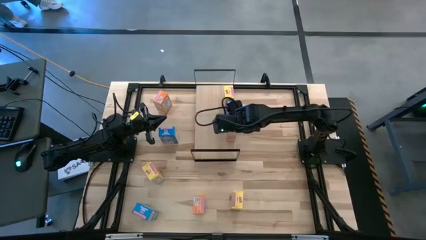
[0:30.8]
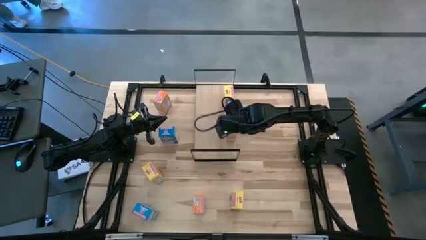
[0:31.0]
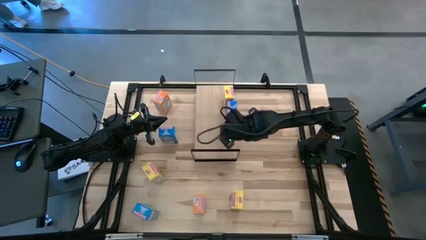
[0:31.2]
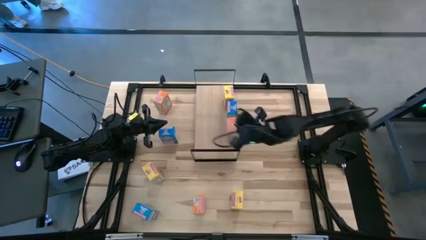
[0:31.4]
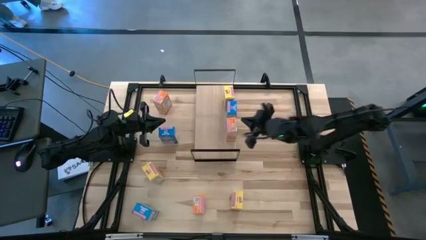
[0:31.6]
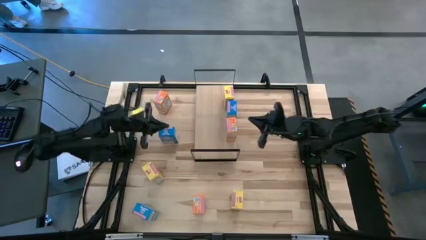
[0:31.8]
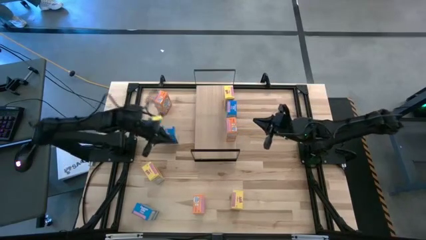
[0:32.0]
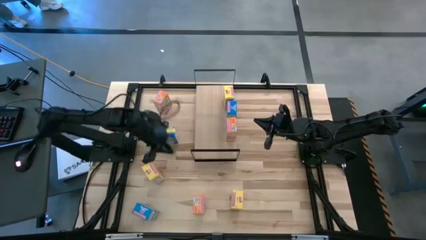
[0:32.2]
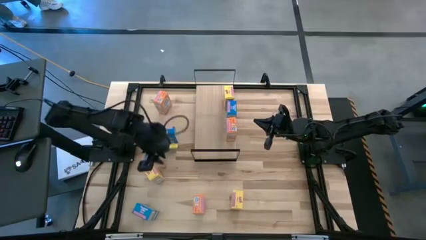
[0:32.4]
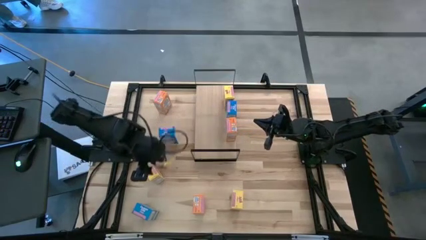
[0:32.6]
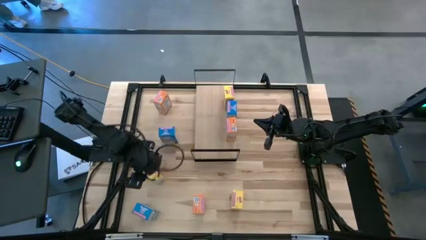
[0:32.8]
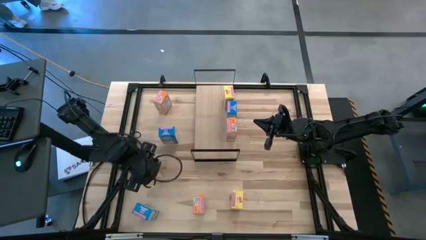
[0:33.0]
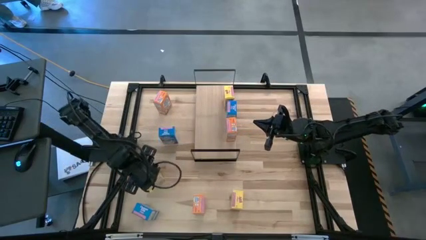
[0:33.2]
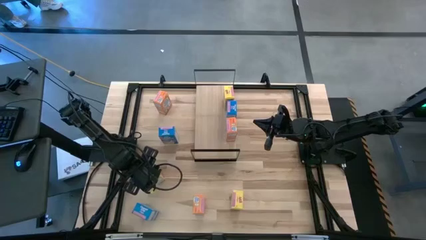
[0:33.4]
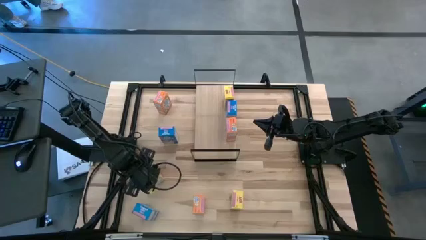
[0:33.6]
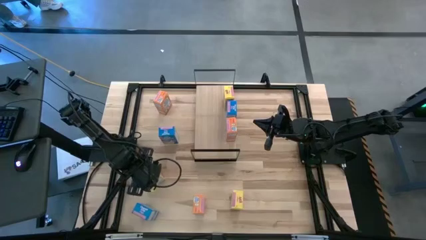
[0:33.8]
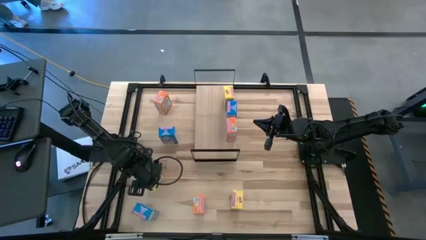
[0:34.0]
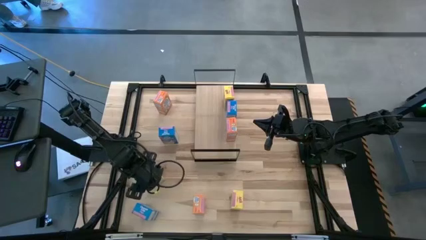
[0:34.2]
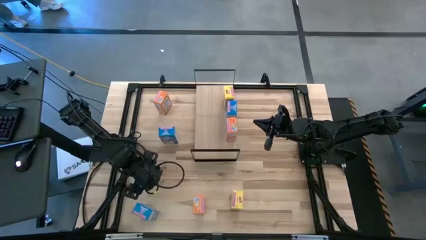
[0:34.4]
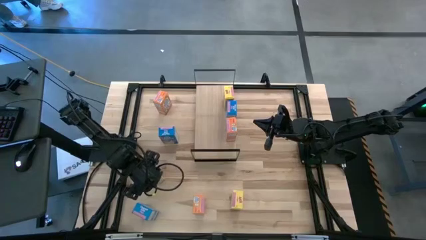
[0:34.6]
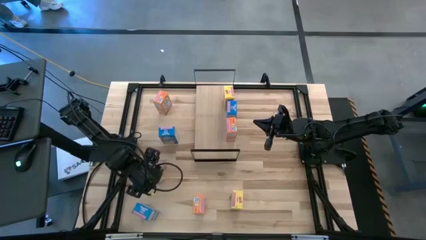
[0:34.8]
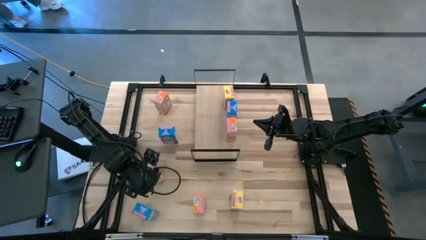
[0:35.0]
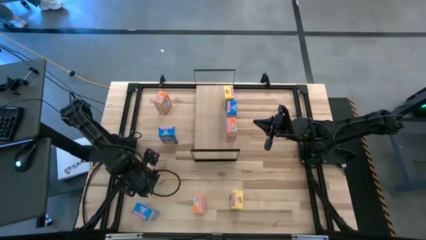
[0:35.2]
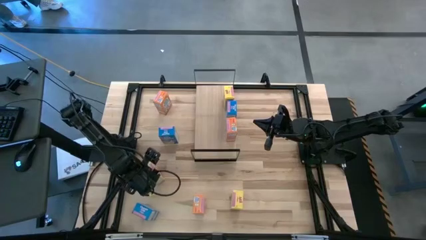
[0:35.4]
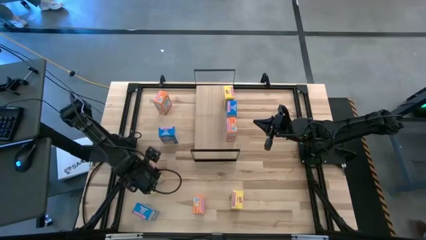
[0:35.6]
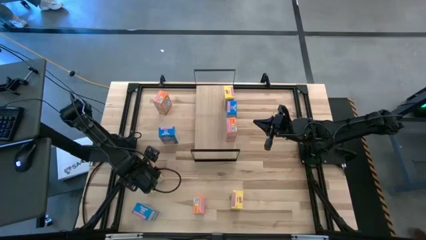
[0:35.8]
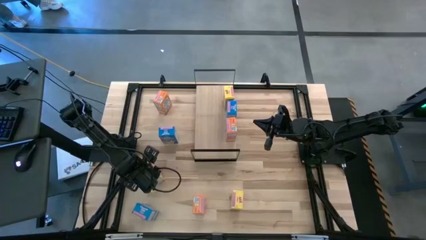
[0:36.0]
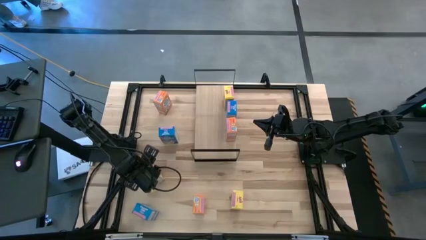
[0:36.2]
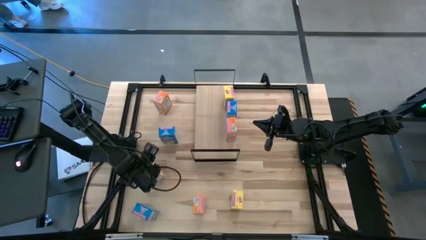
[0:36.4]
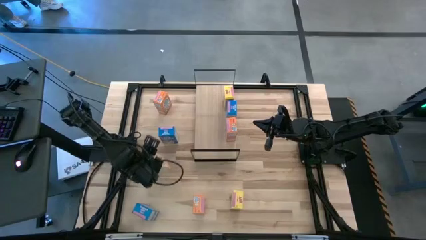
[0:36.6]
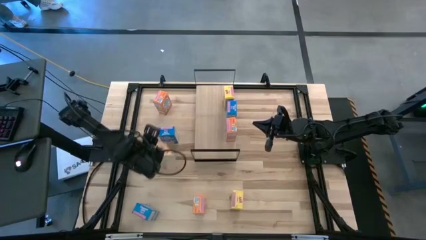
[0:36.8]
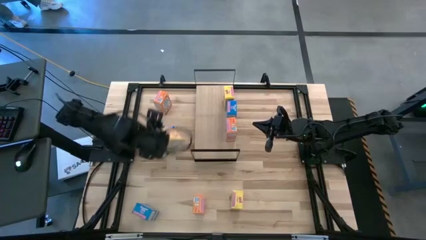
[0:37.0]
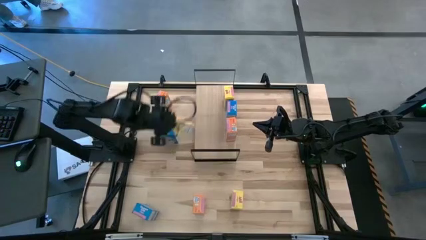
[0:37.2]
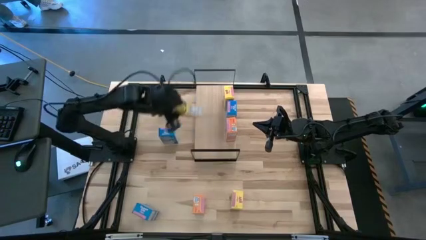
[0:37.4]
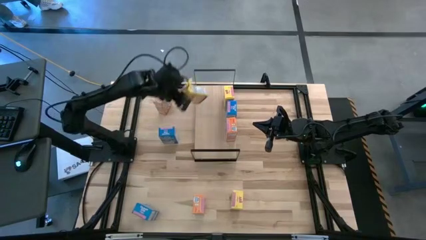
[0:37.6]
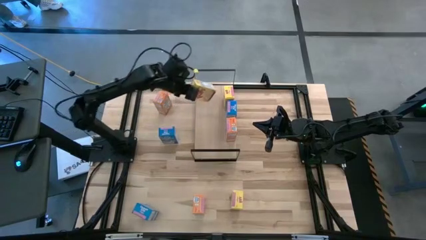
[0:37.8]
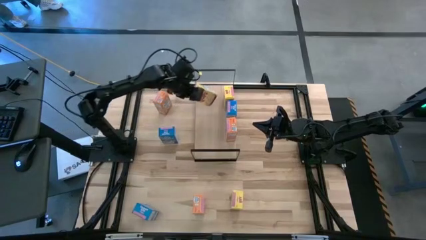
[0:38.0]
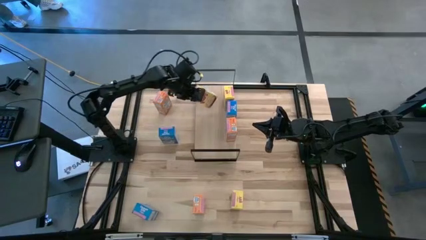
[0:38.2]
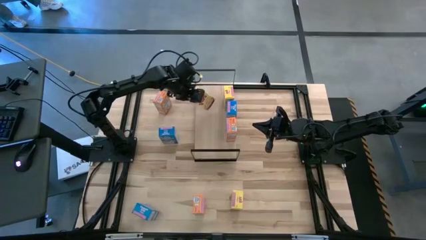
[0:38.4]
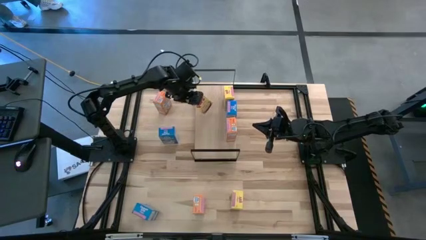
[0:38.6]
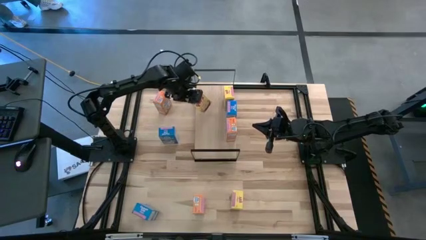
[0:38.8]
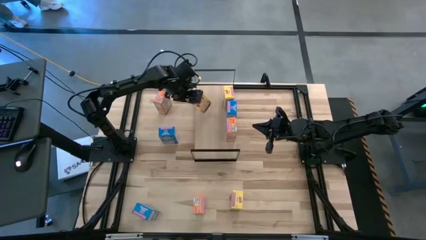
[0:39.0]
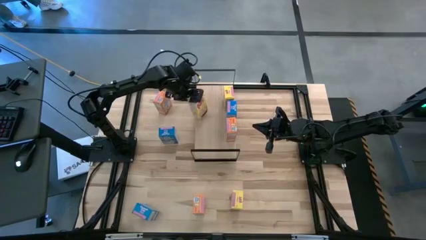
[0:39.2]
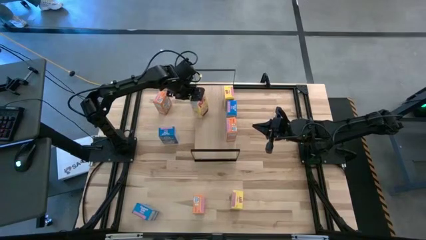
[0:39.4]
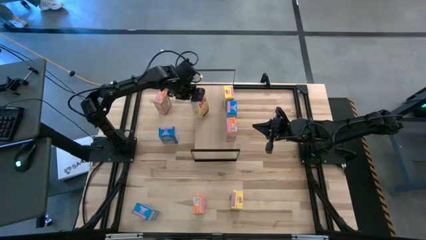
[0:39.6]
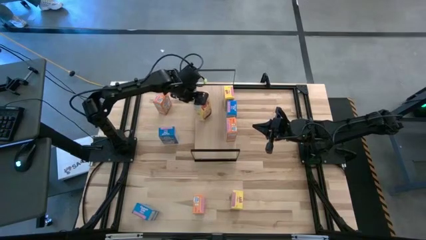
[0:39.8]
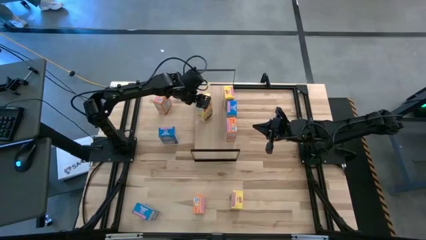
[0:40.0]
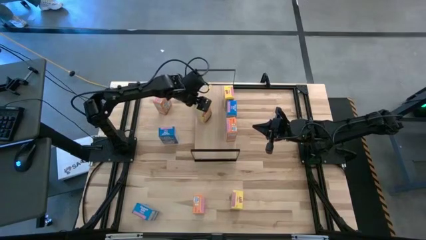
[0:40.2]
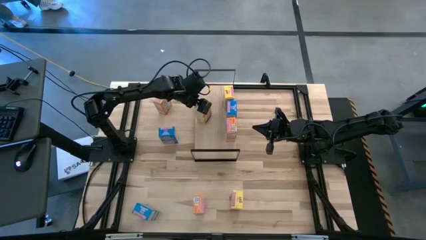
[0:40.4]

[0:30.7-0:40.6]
Task: Stack cereal on shelf
Put the left yellow cereal box on the shelf aligned with the other yellow cereal box on the shelf

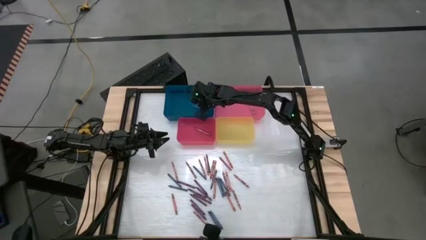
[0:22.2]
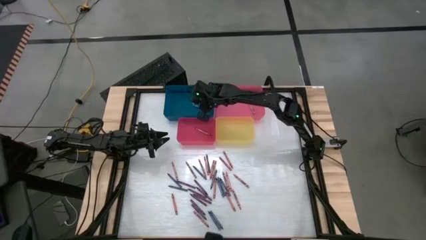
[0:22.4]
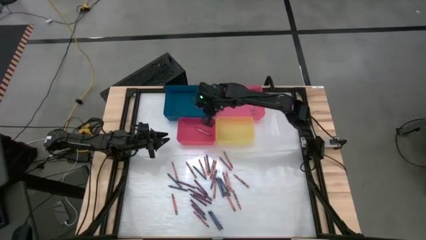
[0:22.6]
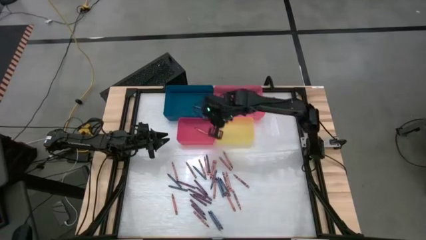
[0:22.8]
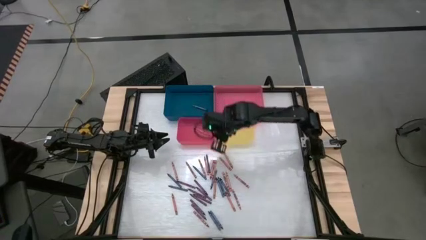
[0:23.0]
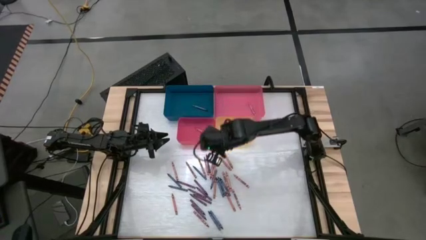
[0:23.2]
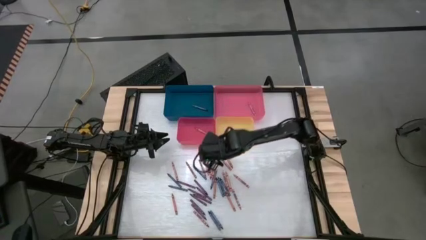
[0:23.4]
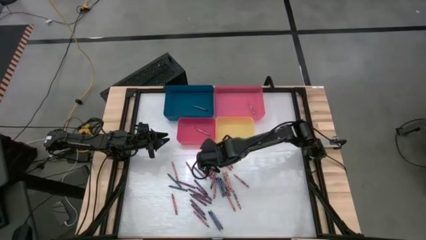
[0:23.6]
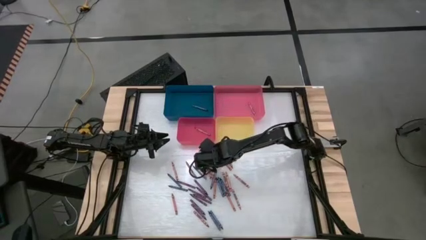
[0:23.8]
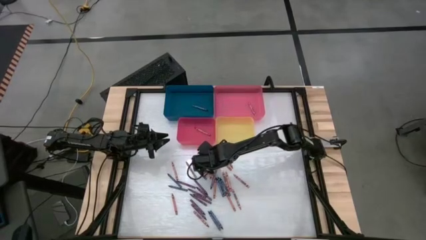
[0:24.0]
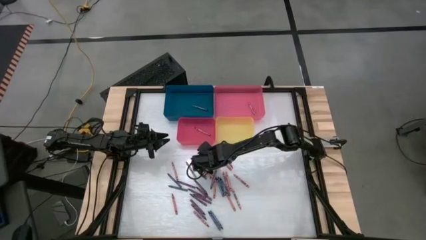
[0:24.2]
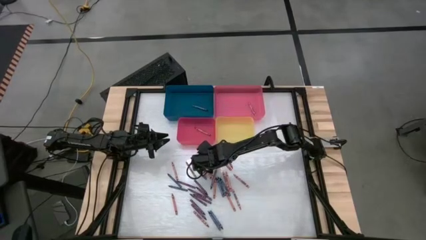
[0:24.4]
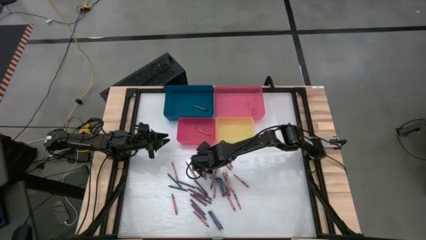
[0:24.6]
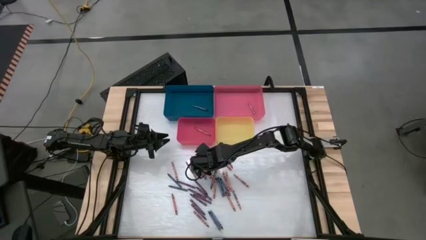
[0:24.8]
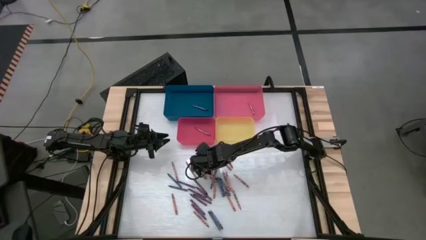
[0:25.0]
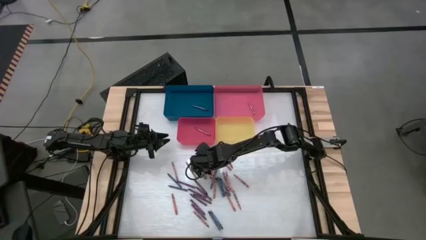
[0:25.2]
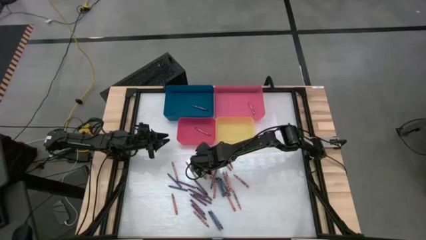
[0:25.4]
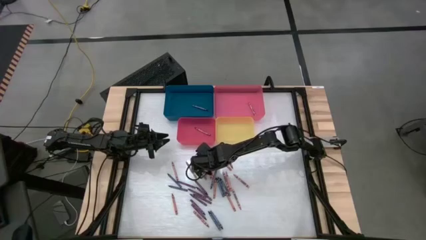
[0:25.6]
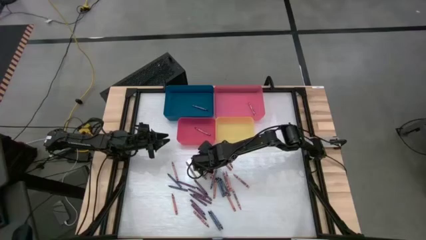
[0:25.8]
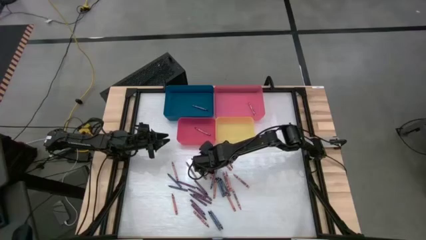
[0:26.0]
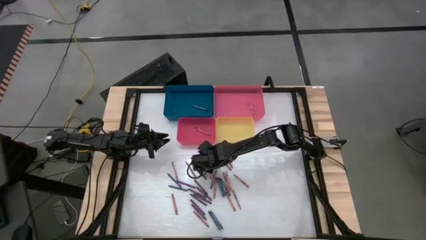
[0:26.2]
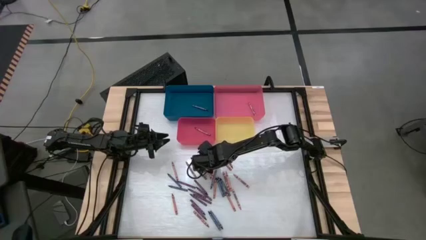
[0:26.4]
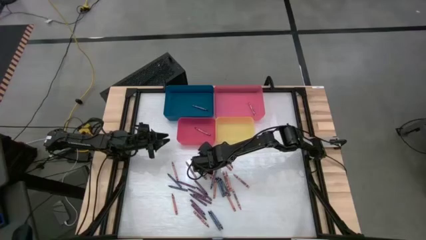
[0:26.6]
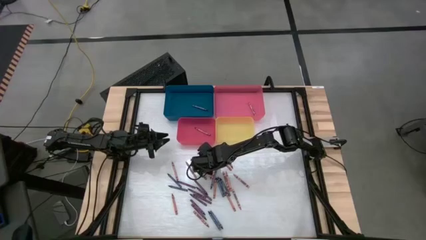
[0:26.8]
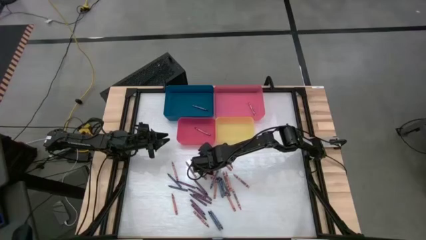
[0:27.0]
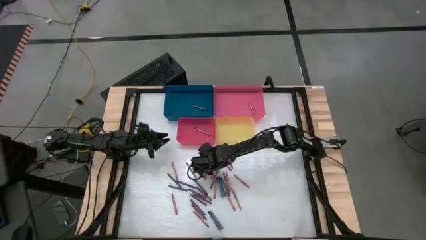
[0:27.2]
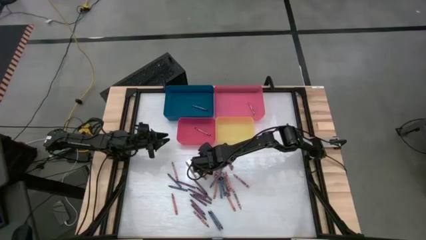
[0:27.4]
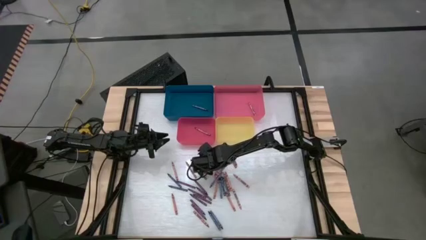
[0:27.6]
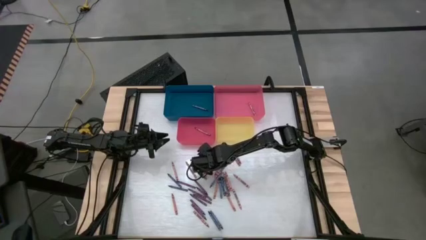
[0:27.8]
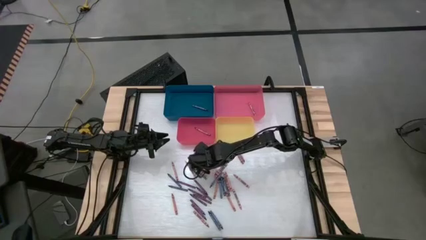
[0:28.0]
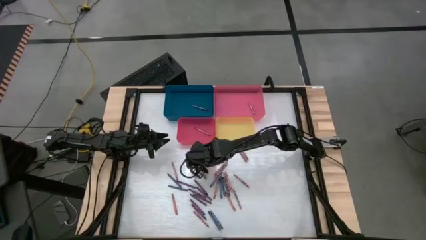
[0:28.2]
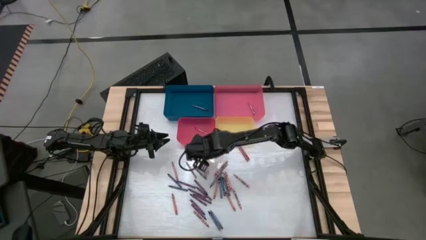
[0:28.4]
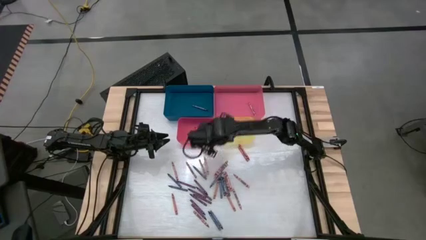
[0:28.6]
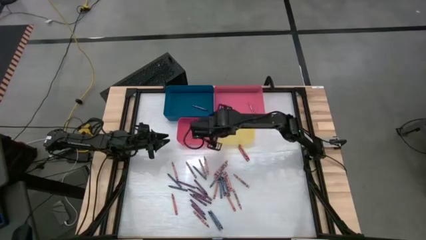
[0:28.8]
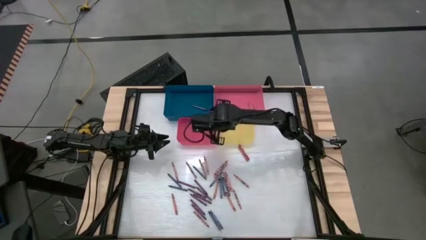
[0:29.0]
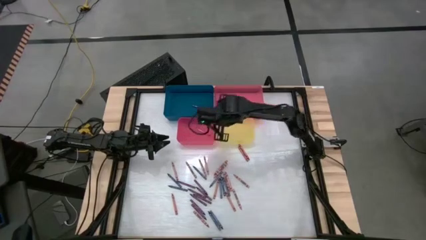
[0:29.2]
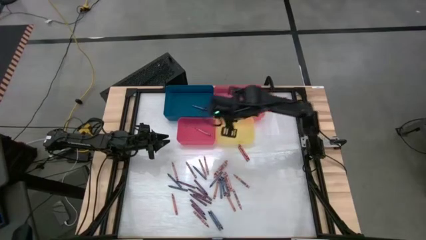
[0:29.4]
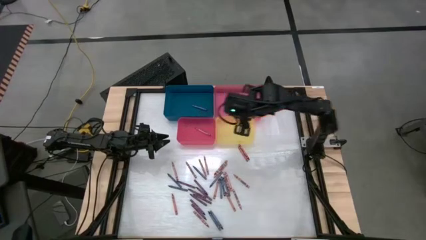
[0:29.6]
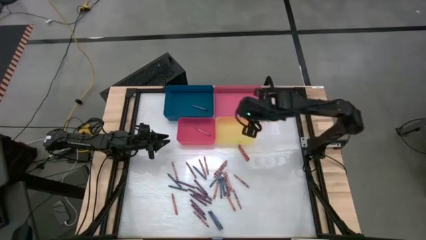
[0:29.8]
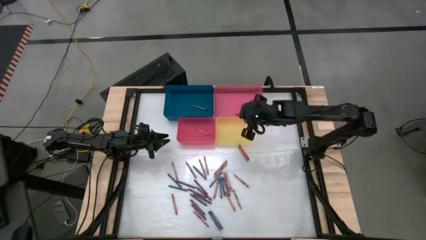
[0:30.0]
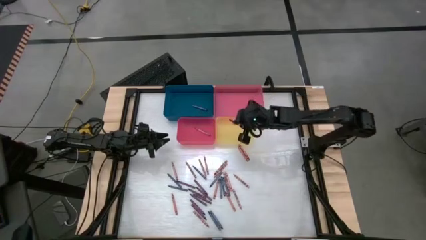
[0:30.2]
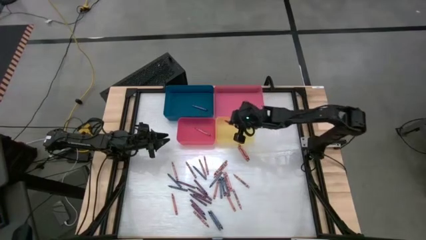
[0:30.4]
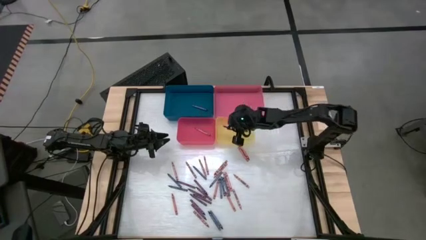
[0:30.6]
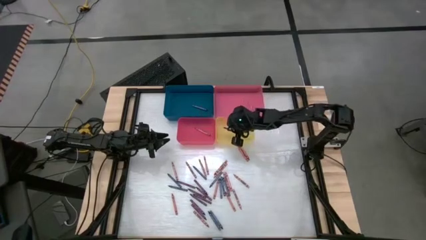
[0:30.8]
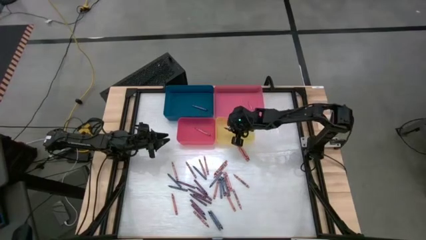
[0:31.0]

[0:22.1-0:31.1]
Task: Sort crayons
Put the violet crayon into the yellow bin
